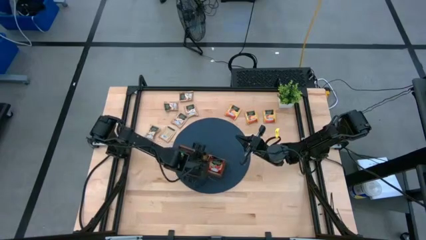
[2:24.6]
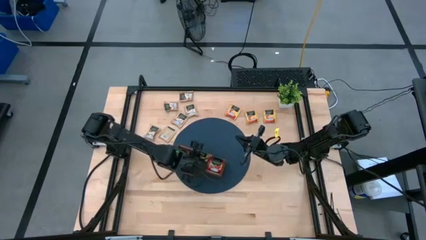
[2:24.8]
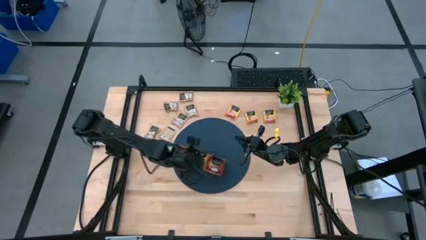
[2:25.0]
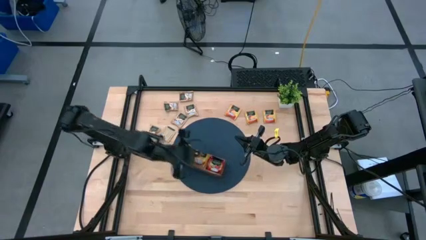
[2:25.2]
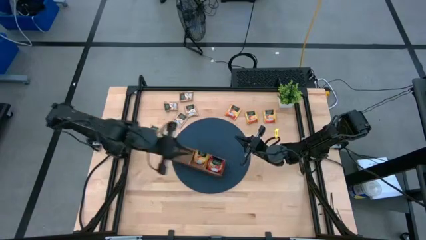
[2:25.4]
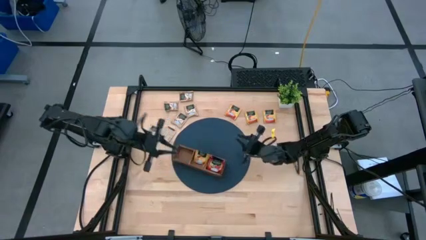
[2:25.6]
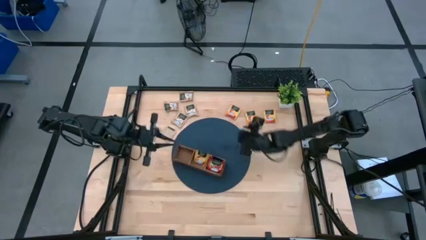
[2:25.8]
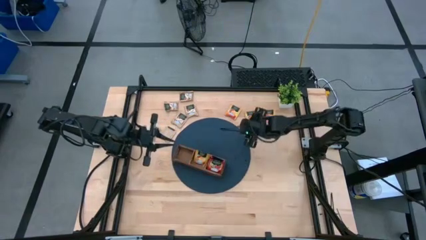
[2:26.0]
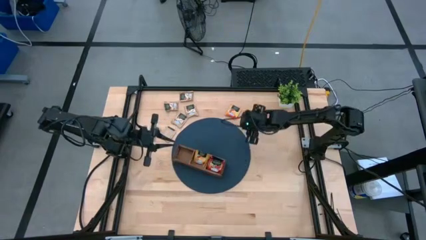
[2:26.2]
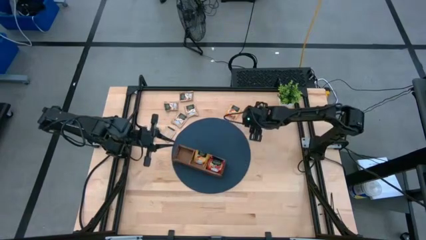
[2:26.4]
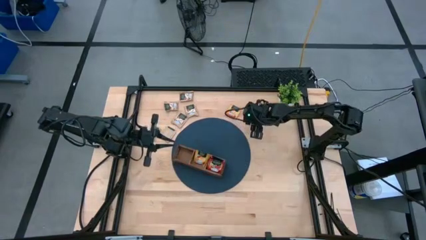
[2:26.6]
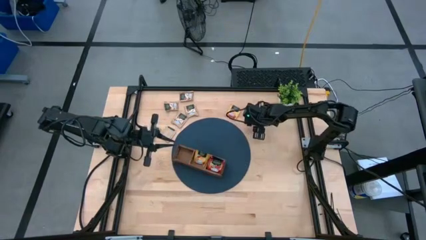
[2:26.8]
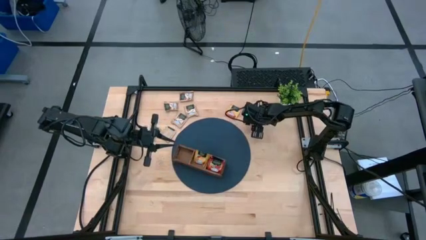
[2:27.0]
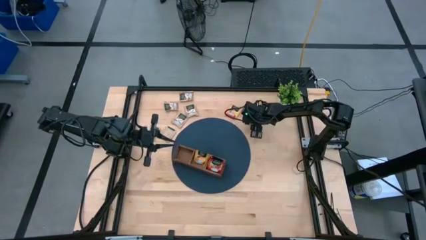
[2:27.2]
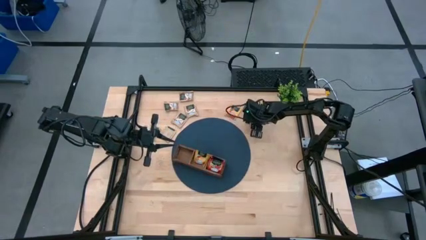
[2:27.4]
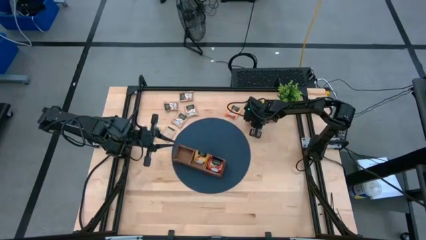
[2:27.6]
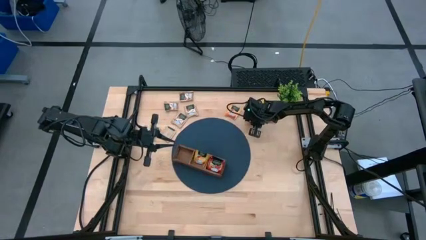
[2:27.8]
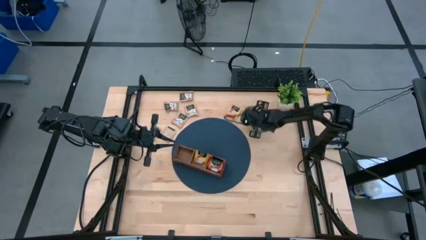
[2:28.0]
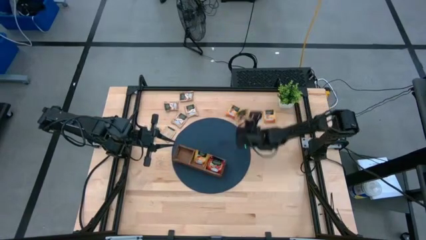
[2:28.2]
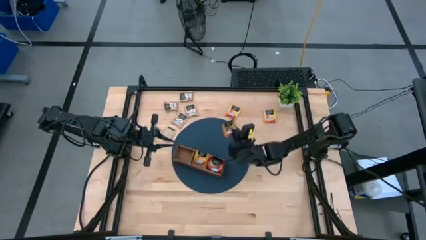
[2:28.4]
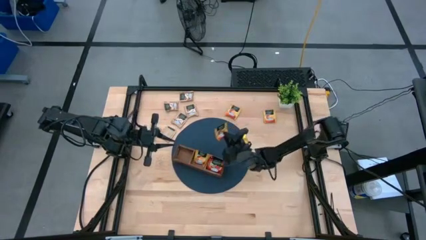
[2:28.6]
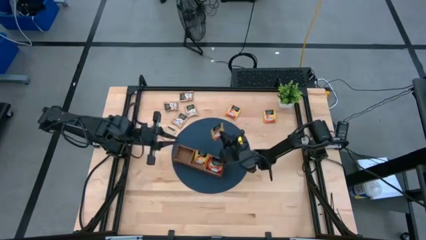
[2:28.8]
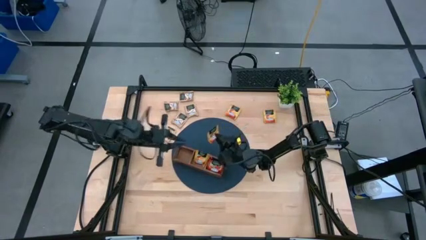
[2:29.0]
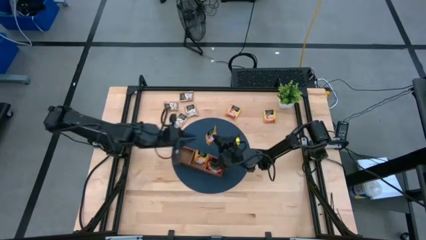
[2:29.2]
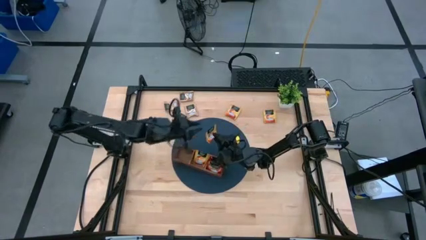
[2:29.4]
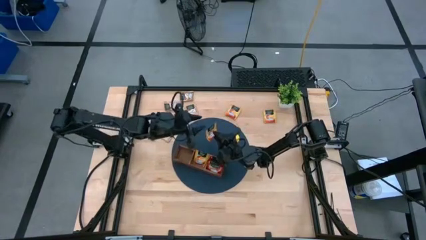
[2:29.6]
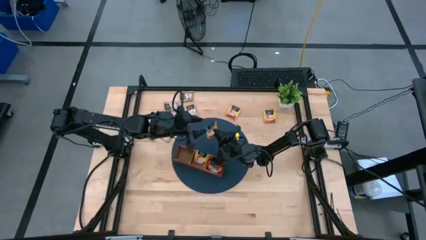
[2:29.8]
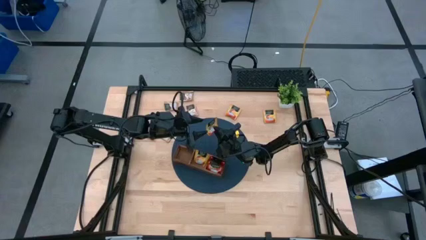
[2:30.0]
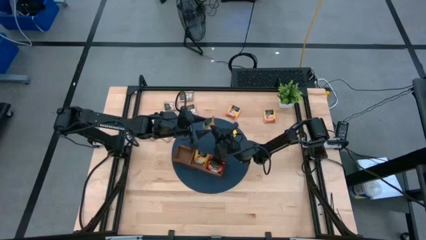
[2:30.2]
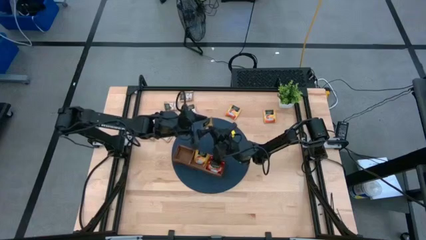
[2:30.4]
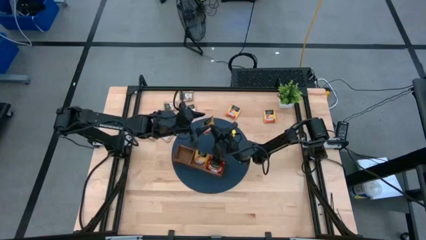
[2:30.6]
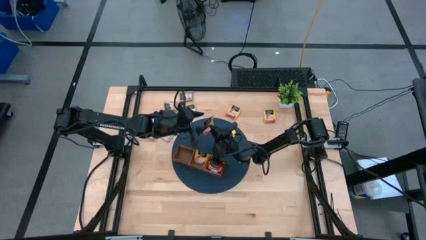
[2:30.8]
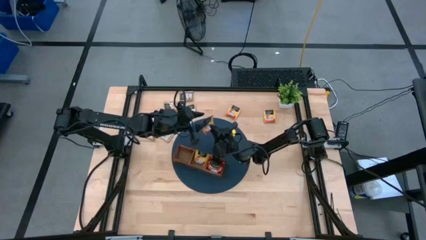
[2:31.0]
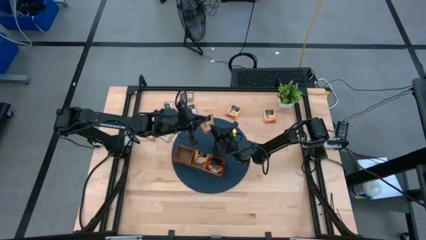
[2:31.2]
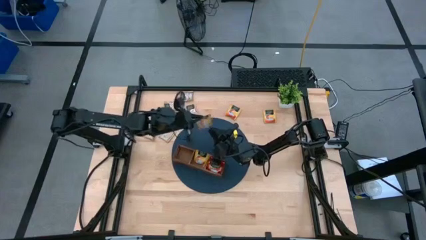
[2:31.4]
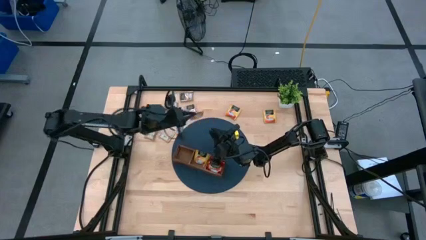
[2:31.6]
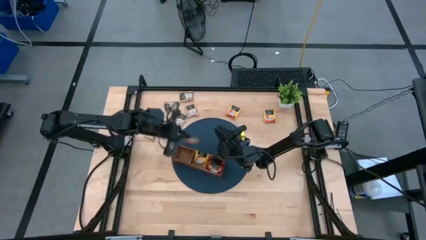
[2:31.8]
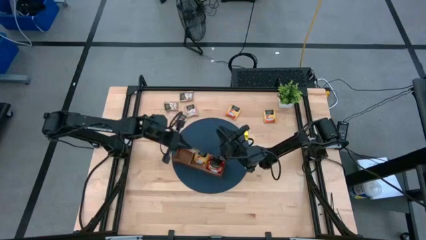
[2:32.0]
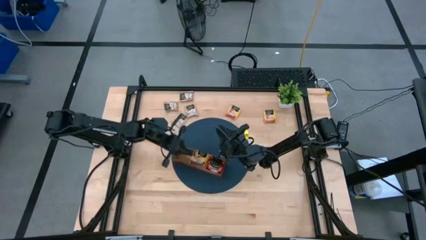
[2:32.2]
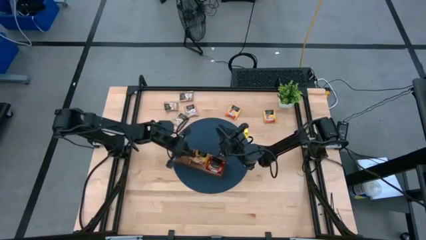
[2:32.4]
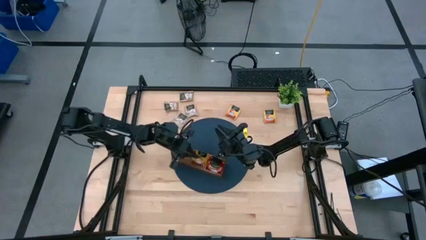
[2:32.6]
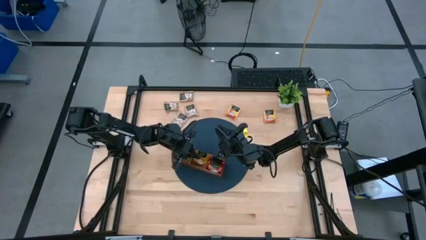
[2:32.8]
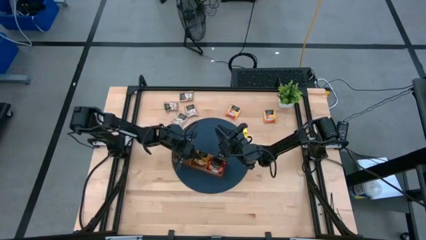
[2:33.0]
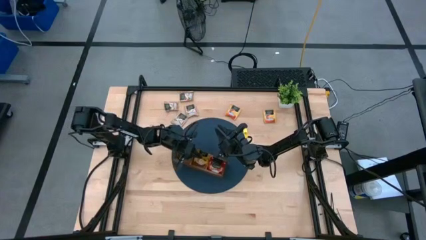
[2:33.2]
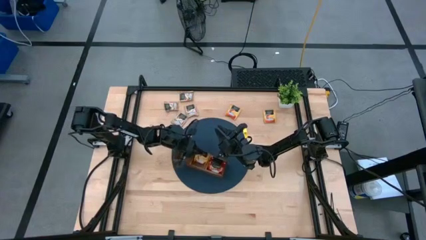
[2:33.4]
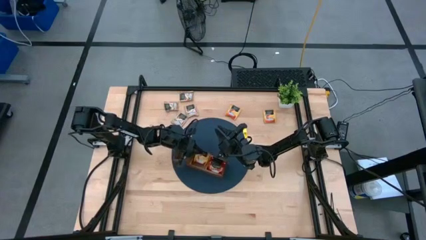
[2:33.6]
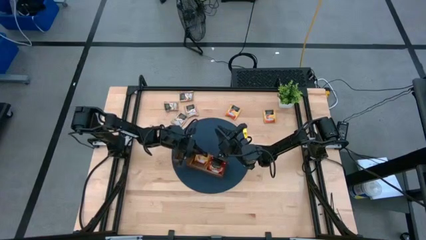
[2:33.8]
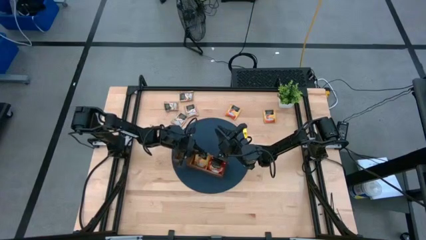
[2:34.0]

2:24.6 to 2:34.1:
Task: Pick & Place Tea
Put the yellow tea bag into the middle section of the wooden organizer

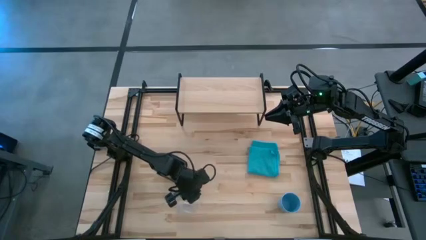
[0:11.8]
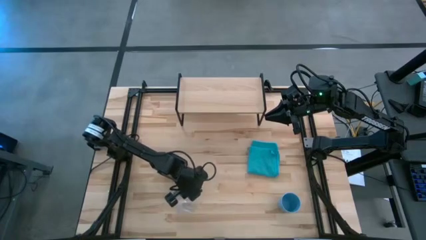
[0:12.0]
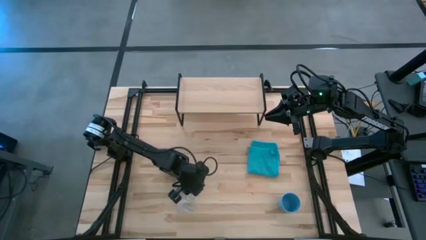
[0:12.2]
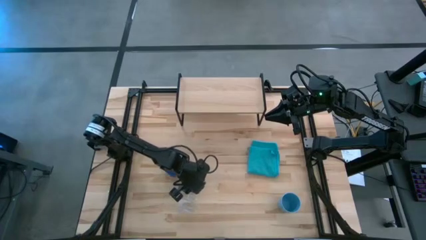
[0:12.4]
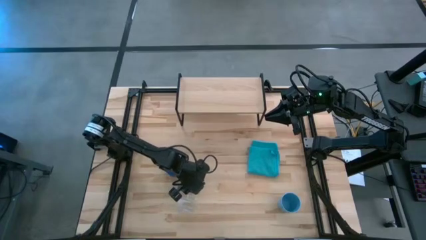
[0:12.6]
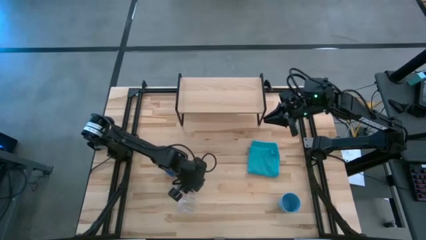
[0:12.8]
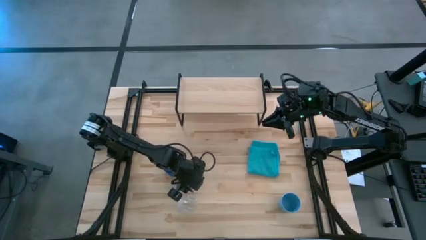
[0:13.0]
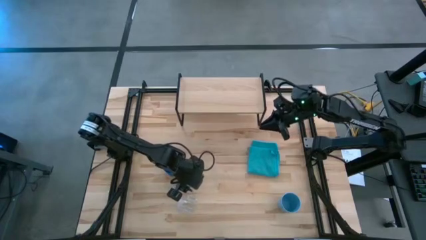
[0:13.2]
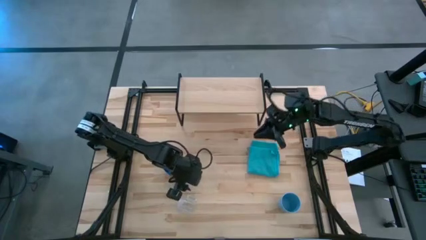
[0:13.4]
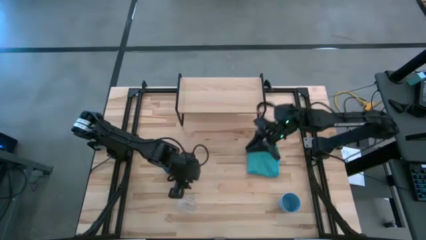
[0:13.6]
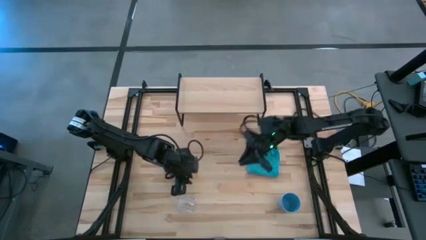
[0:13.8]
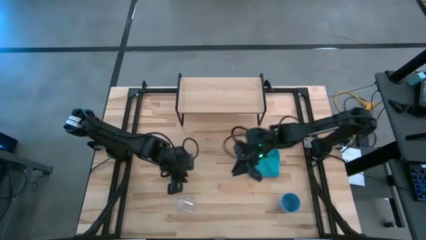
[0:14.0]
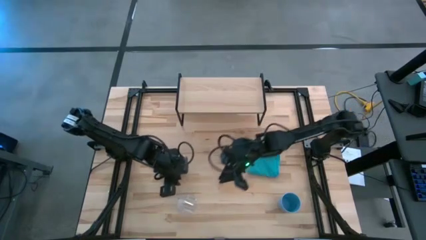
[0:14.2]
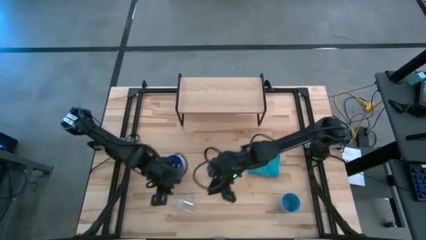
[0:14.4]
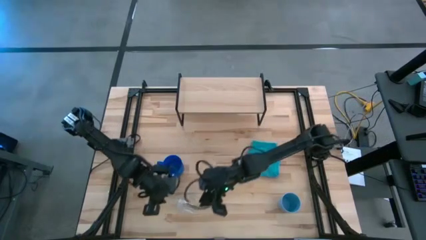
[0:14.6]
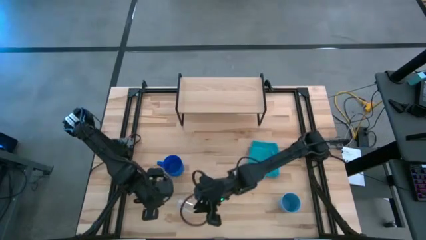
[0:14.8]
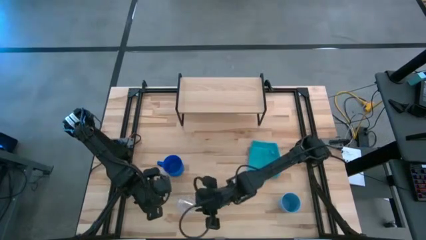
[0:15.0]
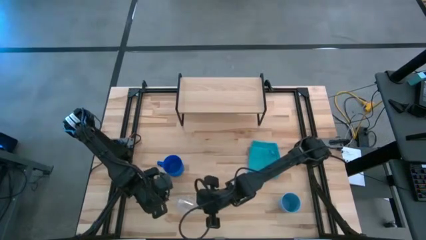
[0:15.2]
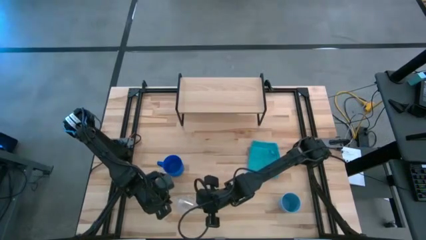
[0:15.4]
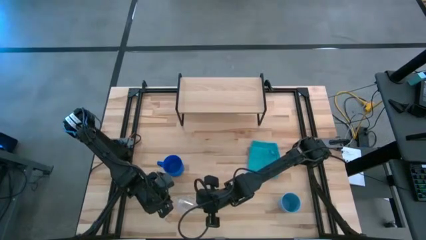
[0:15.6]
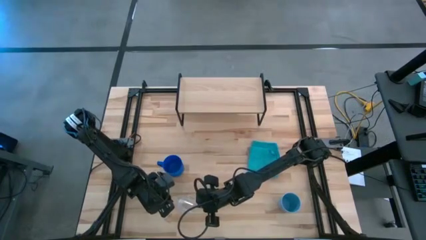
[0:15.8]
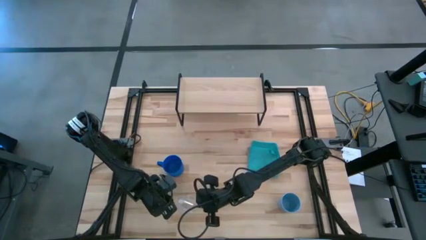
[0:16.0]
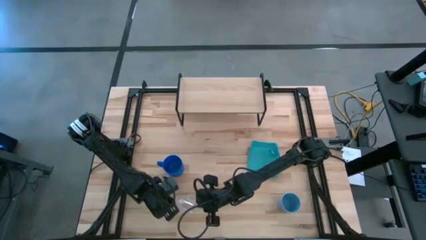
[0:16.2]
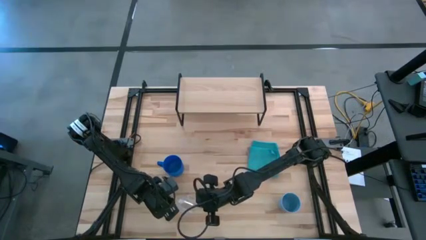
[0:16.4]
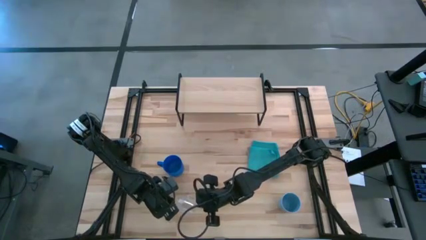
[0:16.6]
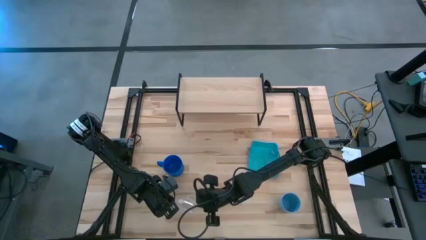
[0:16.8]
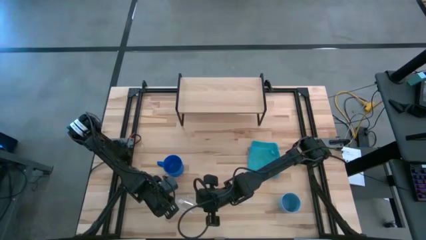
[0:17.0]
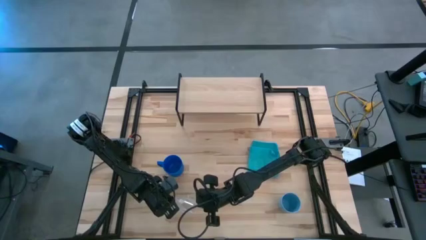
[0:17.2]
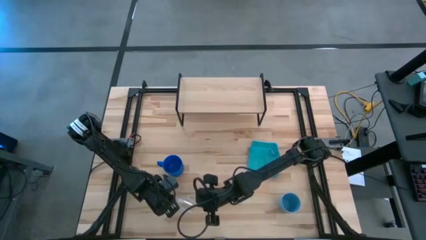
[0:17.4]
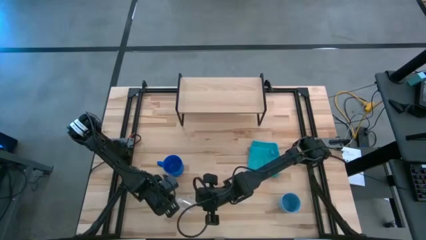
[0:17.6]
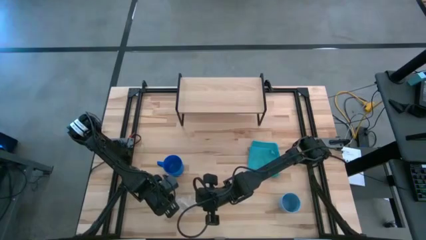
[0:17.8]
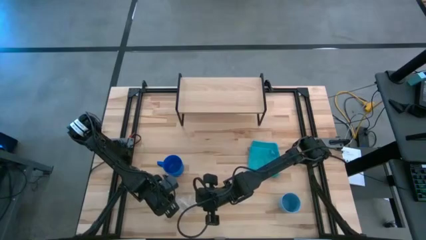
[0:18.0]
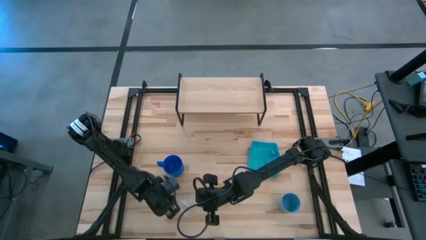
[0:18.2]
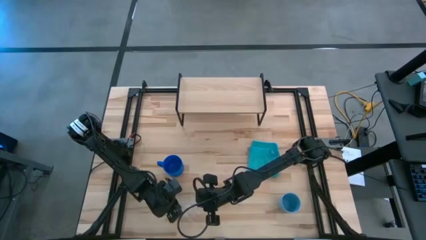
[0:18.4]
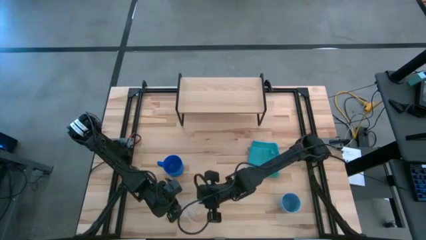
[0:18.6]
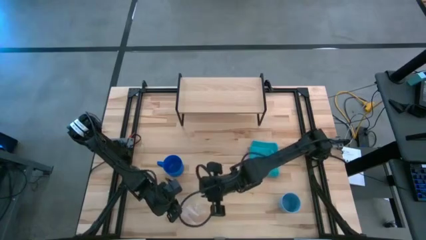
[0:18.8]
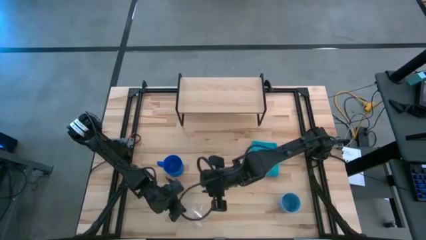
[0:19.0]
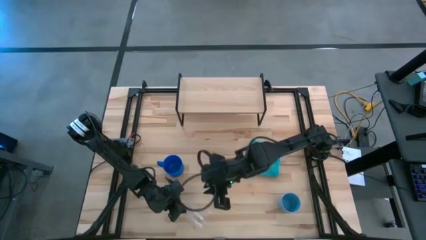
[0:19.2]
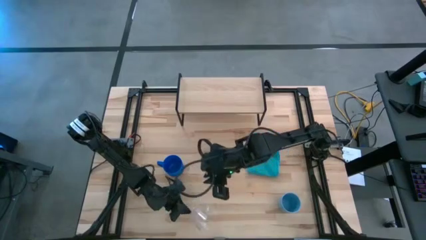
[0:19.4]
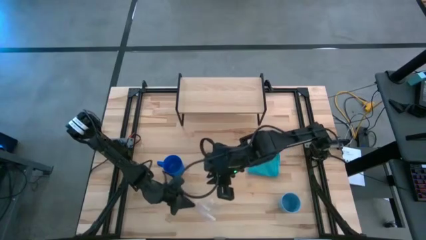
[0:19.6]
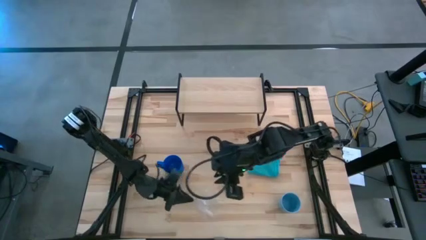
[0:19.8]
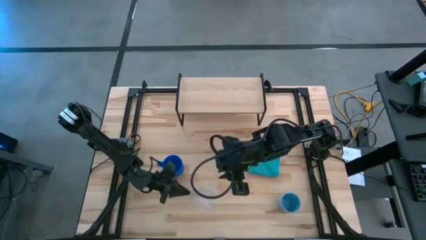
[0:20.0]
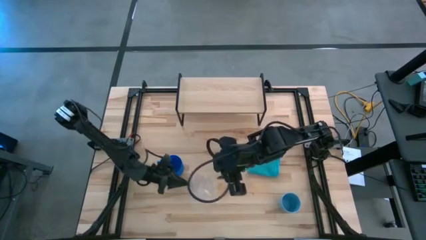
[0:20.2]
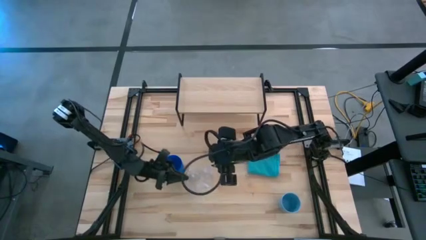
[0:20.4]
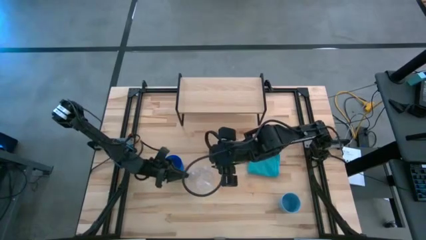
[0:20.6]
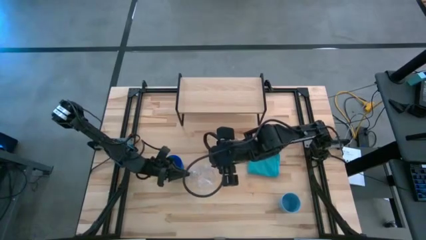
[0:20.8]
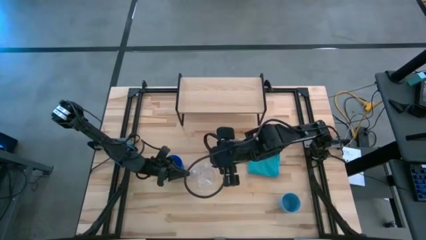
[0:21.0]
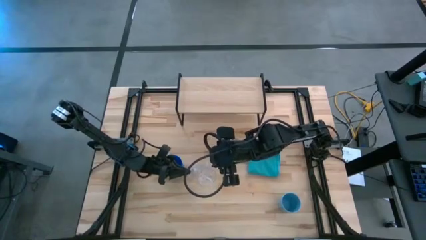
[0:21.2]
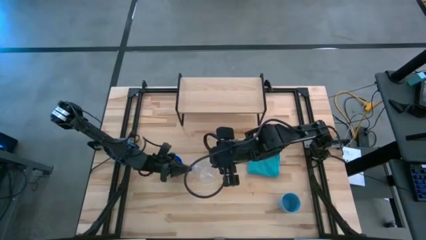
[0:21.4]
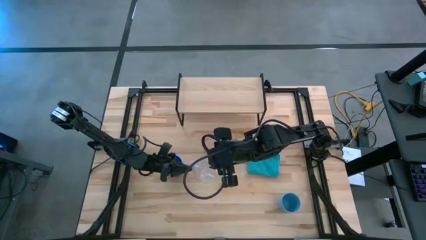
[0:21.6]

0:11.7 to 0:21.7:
Task: Stack small to large cups/mugs on shelf
Put the transparent mug on the shelf
